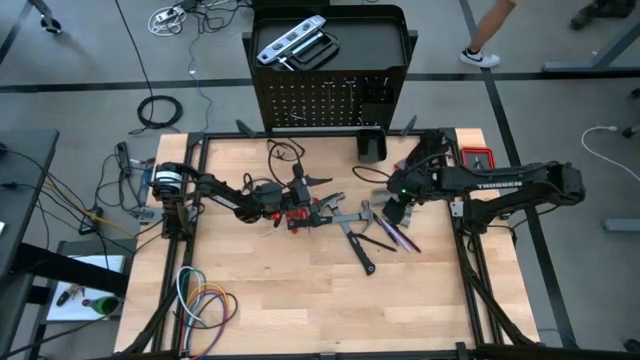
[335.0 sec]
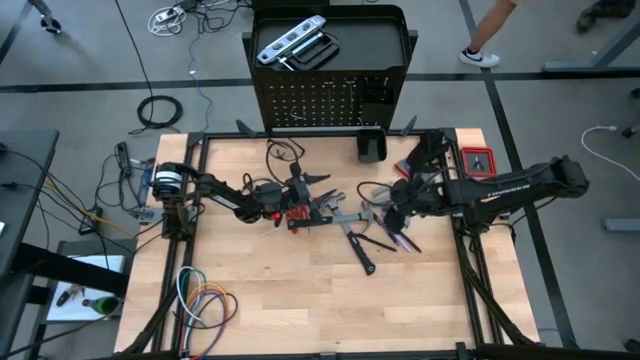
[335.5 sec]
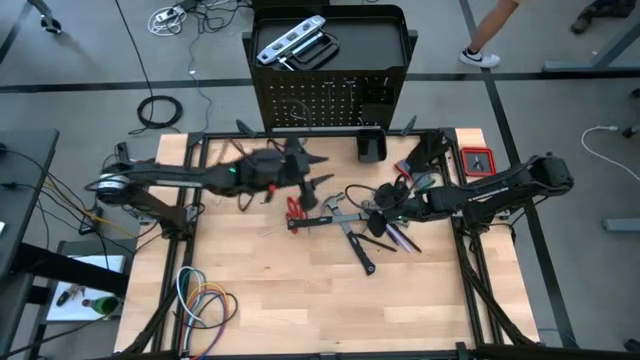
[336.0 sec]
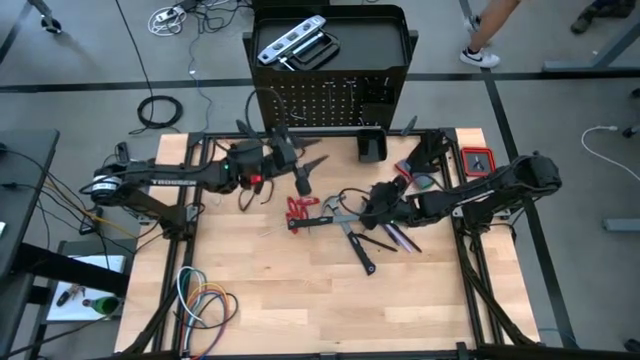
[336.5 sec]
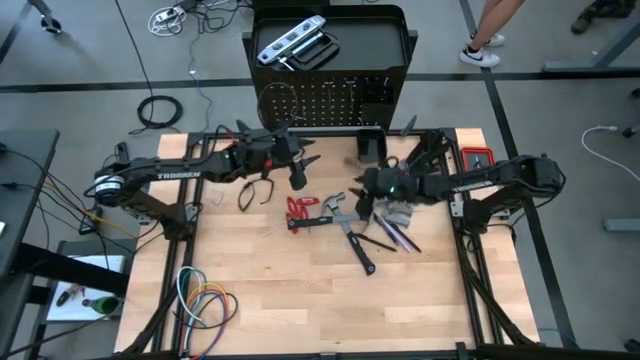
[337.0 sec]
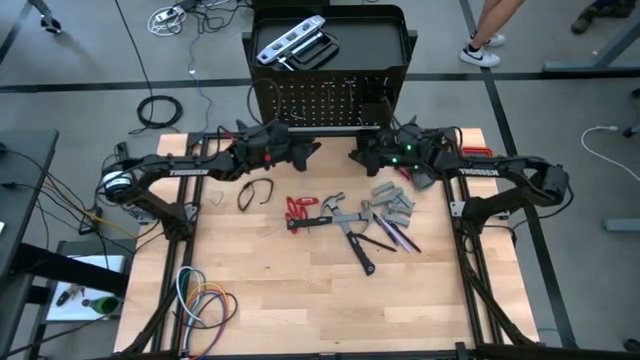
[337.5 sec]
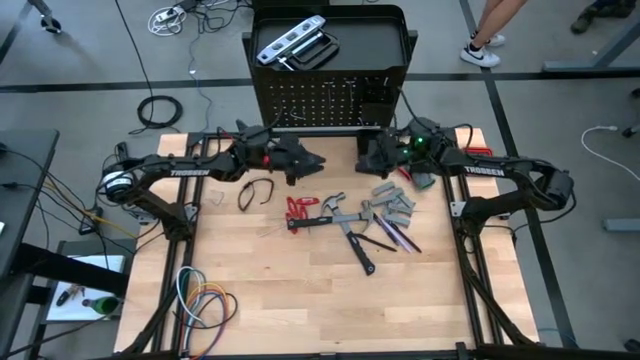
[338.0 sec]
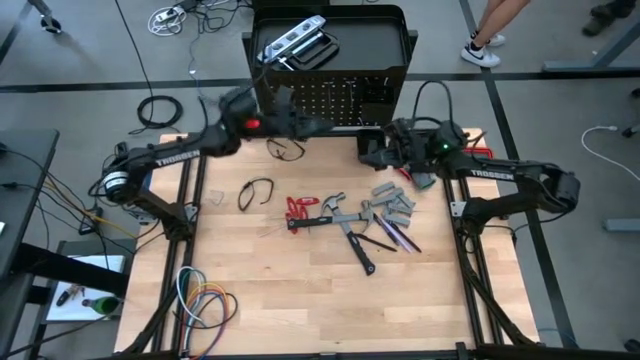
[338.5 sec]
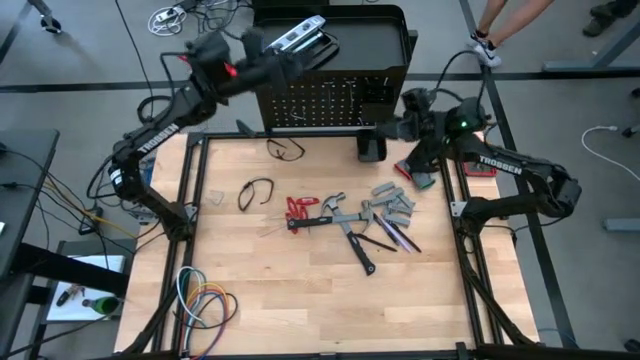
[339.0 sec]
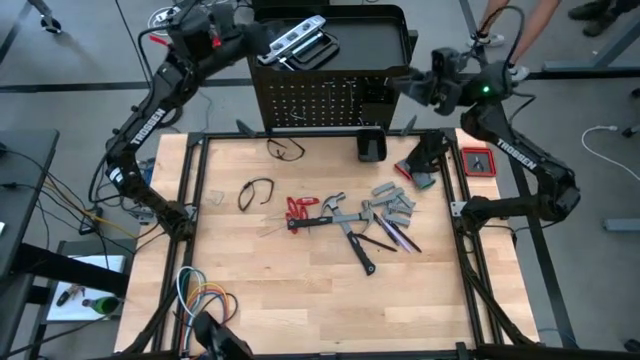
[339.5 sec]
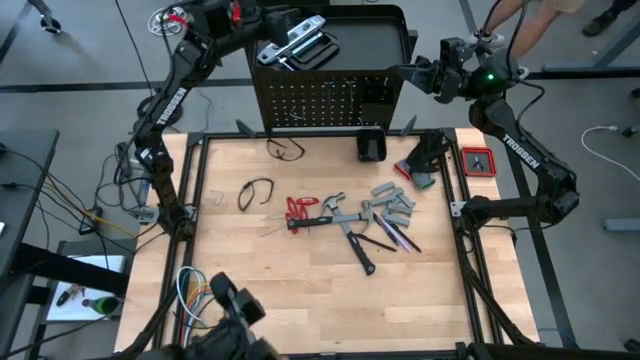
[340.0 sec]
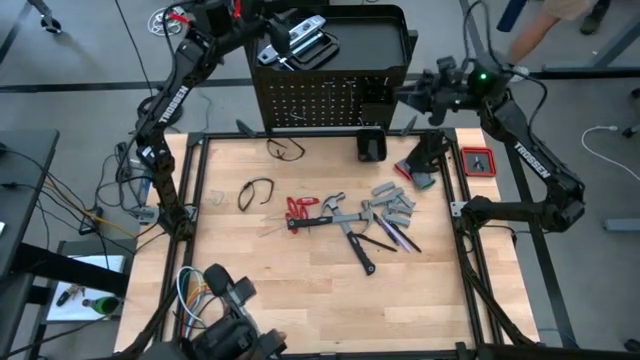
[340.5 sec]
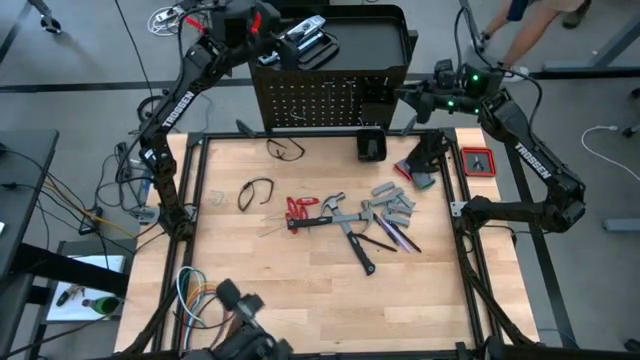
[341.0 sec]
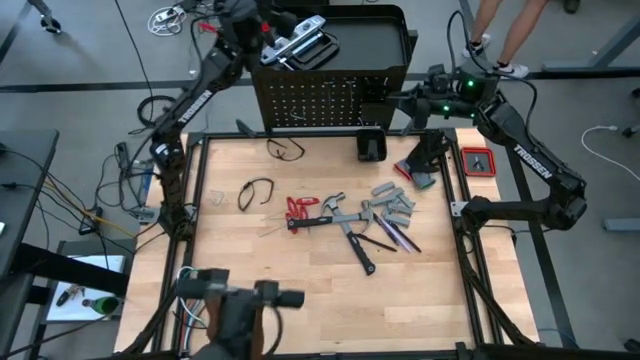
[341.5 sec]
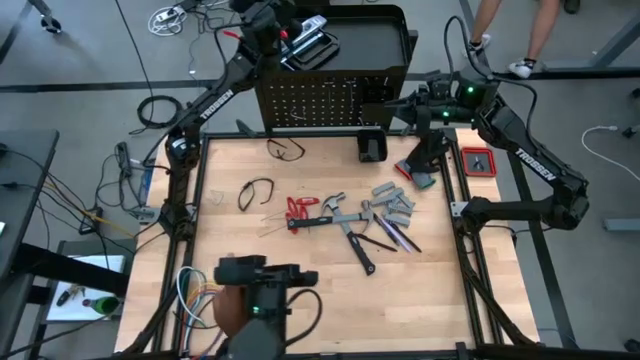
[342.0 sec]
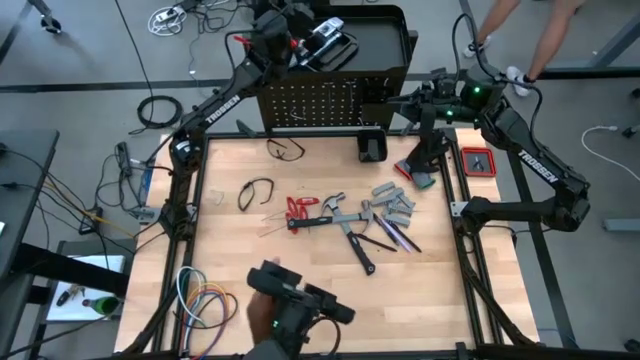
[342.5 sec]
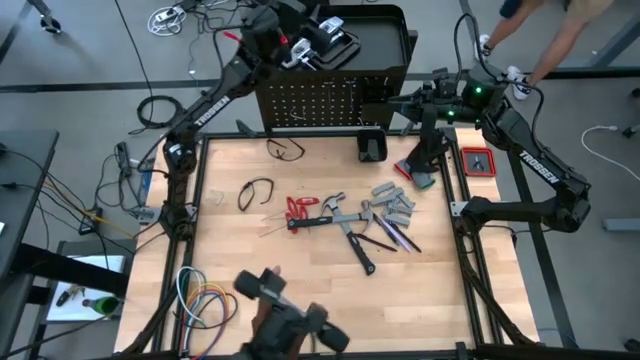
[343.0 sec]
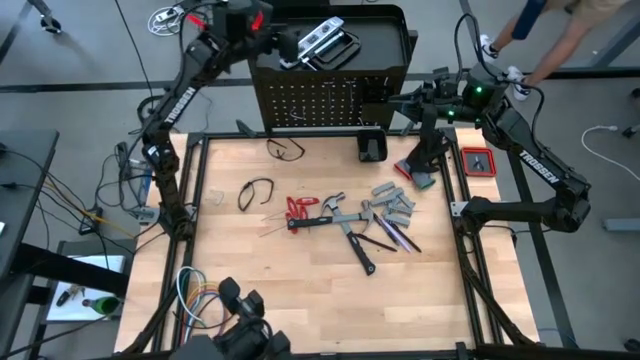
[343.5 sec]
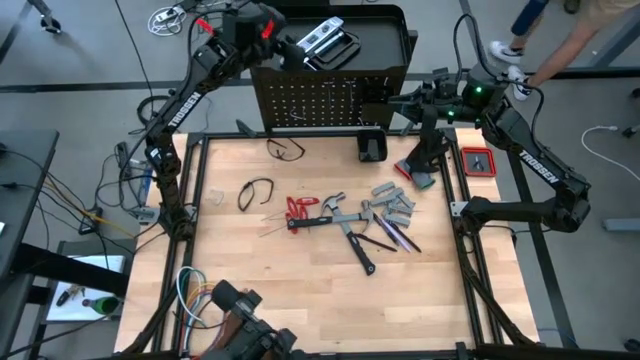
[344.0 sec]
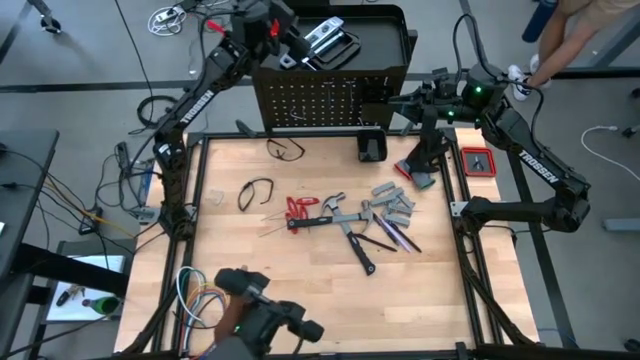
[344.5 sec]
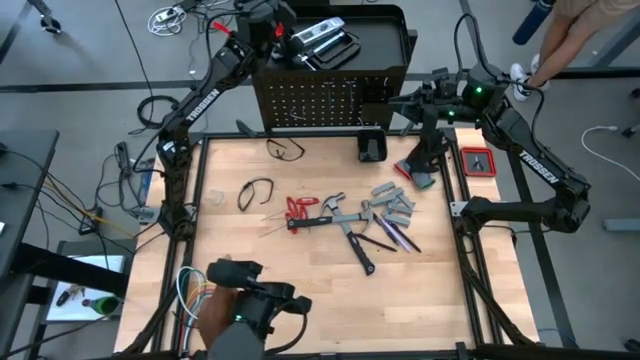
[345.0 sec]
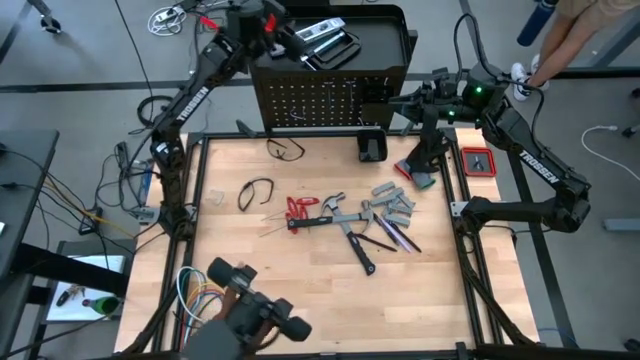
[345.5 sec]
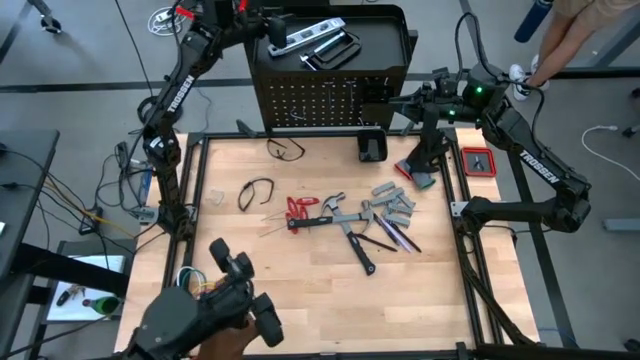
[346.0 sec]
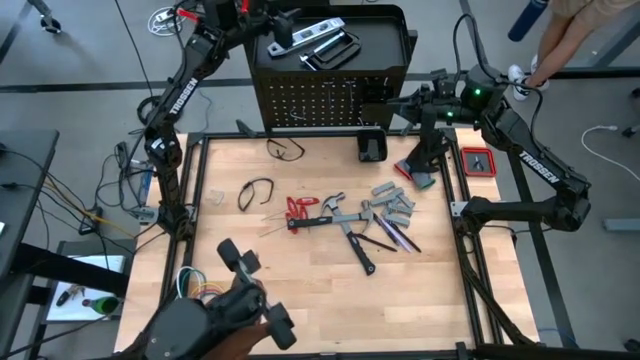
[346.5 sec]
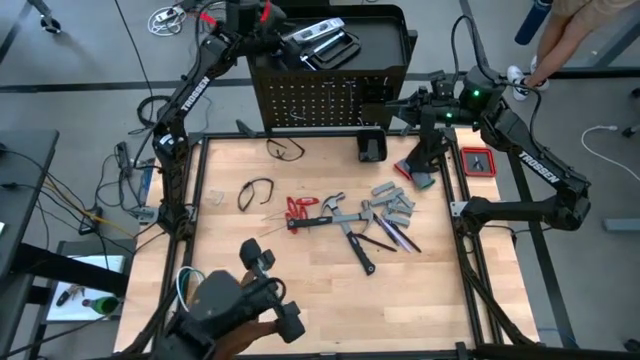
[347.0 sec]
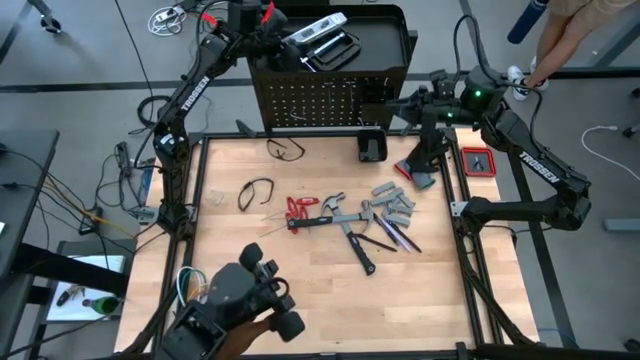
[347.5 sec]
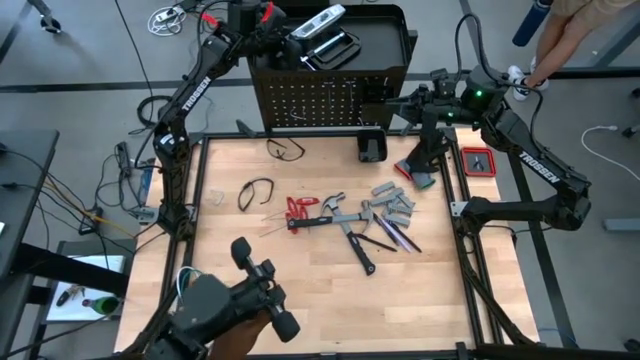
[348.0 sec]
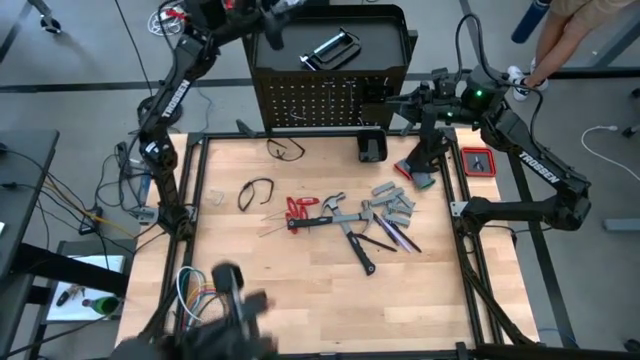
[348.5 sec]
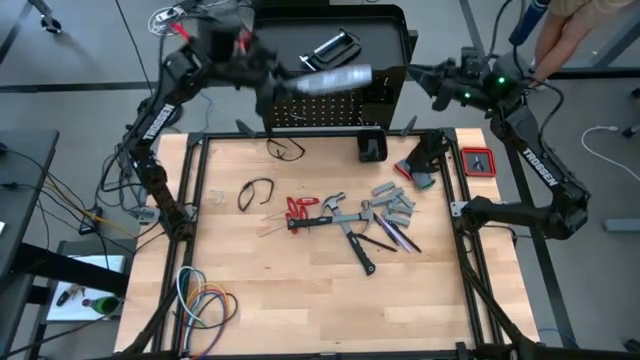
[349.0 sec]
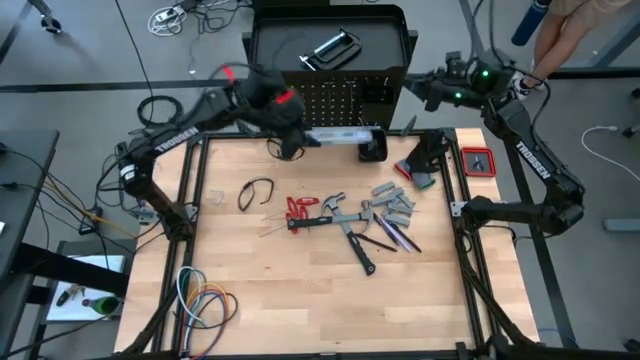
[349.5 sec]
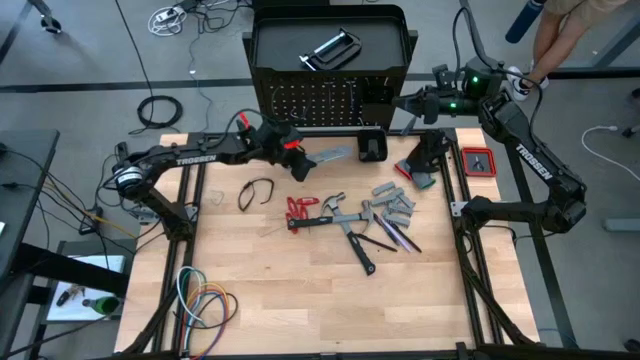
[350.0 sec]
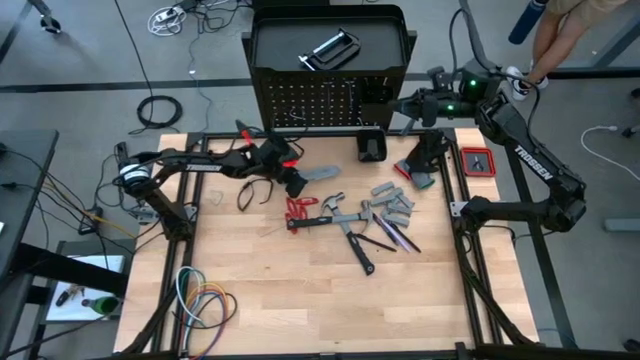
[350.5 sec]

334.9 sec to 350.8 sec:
Task: Hang tools onto peg board
Remove the spirit level from the top of the peg board

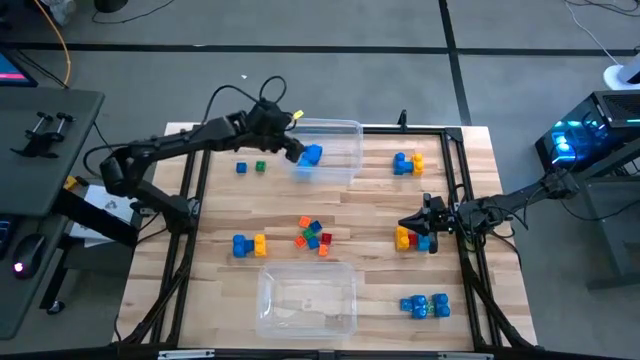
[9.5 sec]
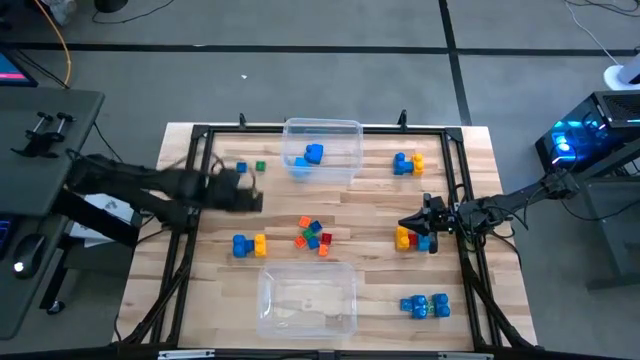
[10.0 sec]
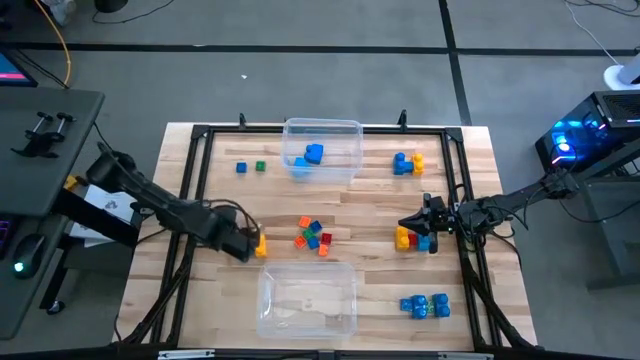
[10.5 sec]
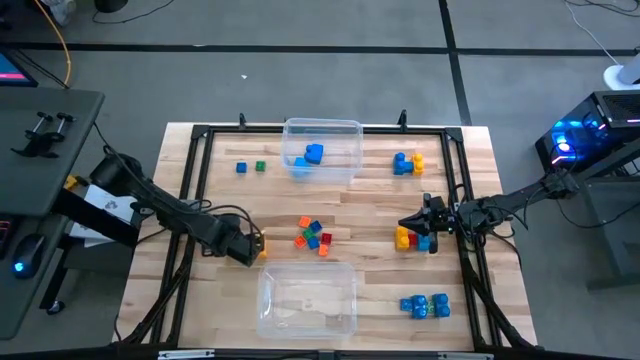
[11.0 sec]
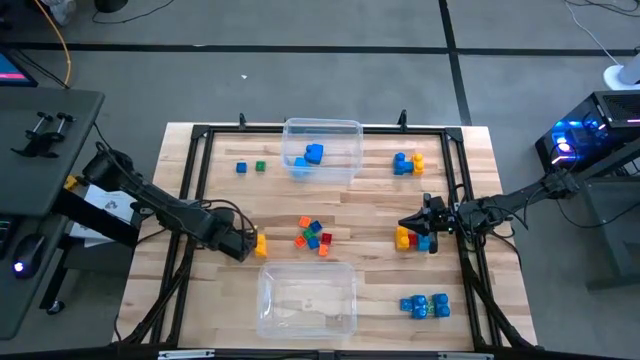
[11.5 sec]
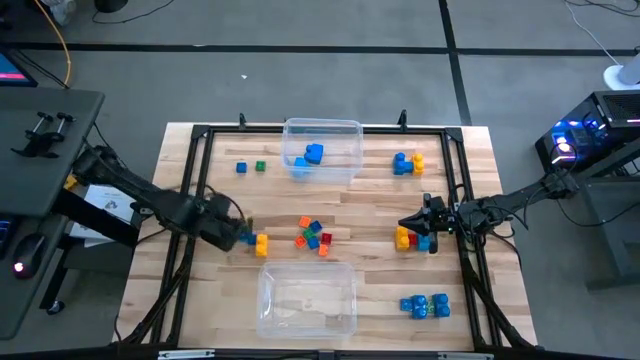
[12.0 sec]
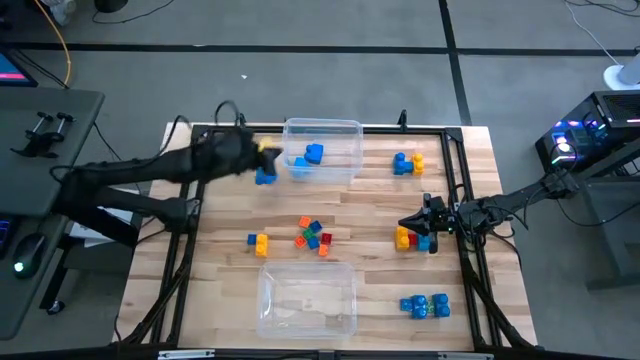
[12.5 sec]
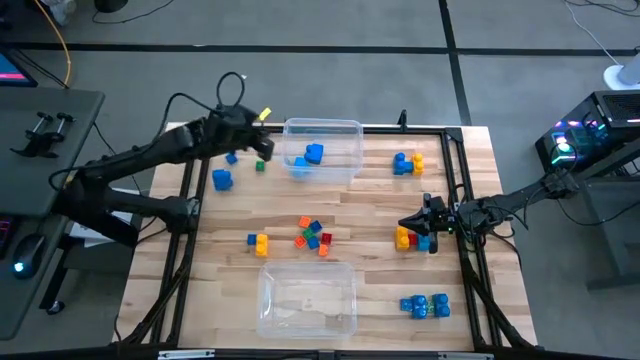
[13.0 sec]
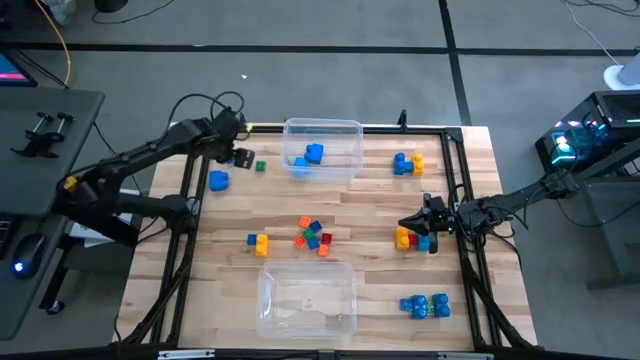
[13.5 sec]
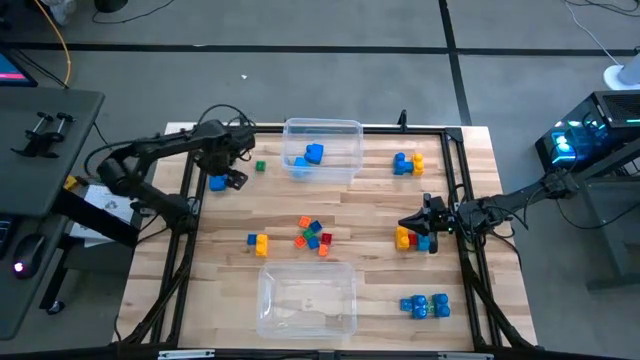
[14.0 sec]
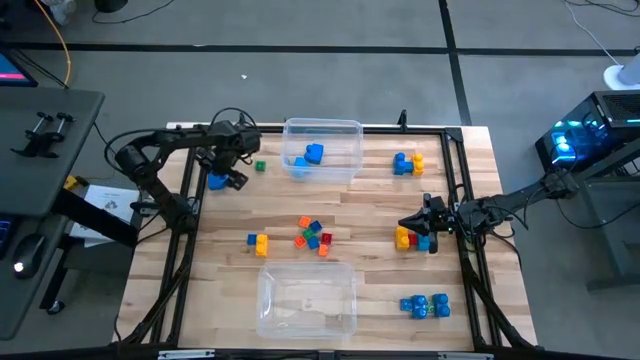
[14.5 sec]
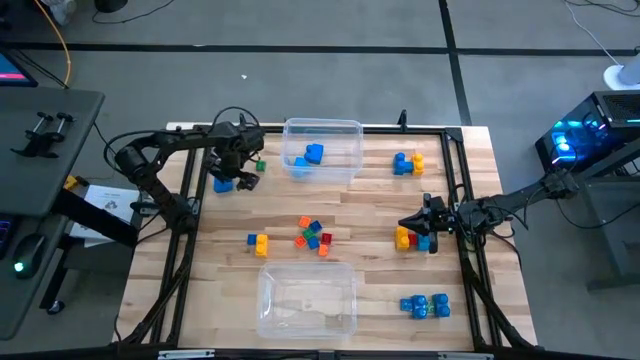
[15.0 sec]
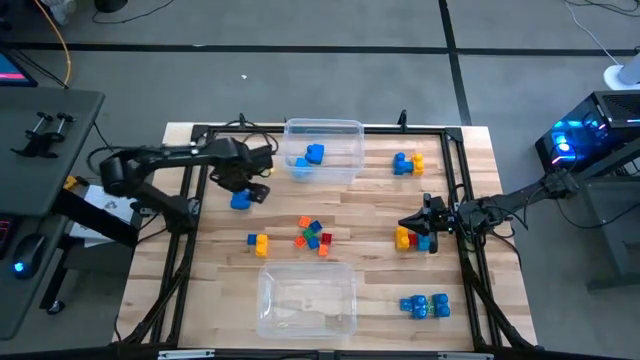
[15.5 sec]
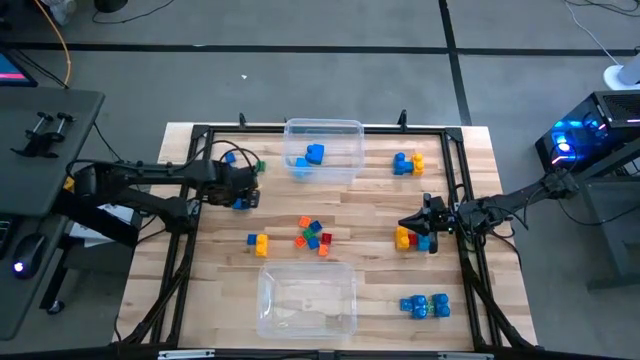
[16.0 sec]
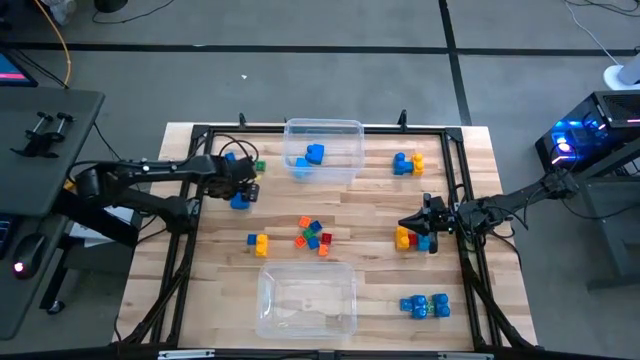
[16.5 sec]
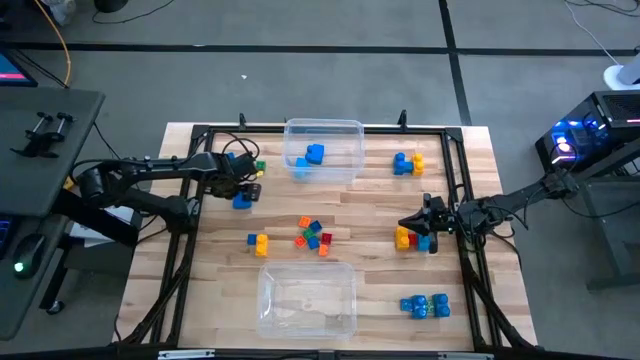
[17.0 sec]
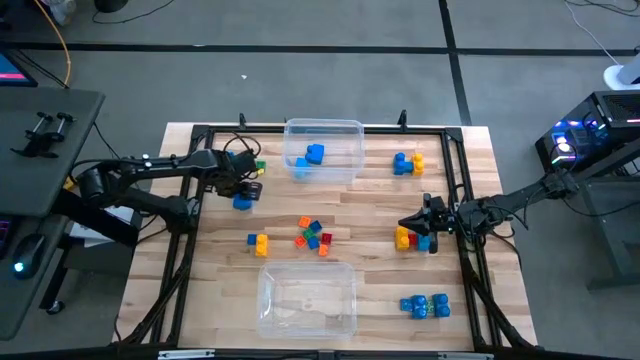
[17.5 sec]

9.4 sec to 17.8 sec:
Task: Sort blocks by size
Put the large blue game piece into the top transparent bin
